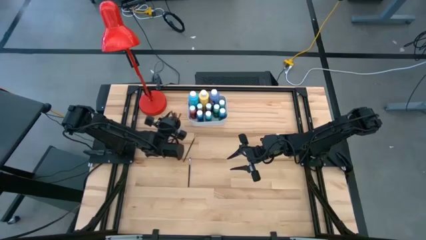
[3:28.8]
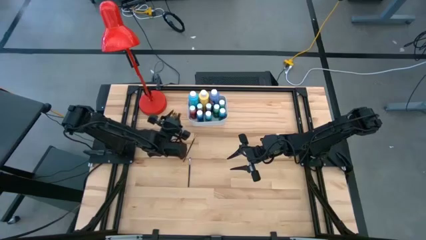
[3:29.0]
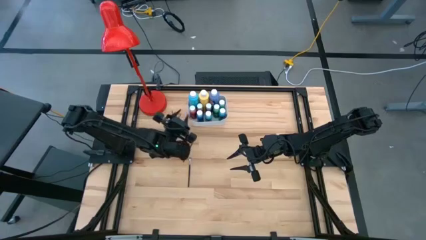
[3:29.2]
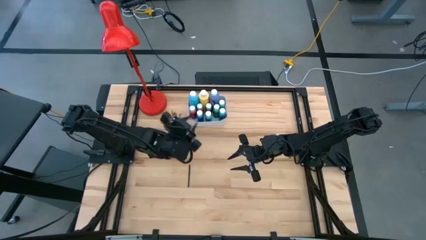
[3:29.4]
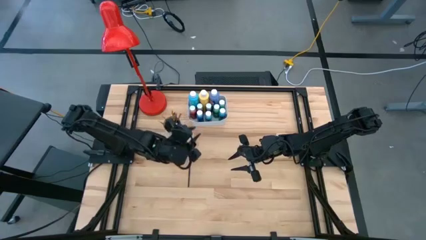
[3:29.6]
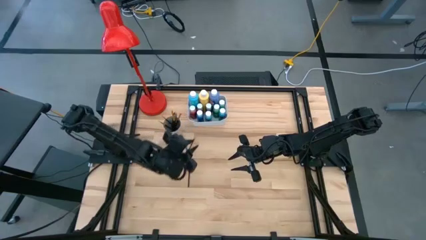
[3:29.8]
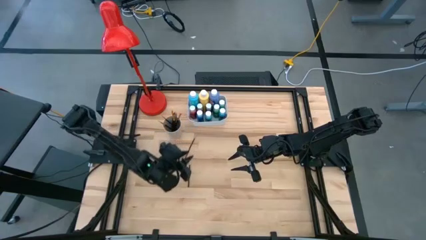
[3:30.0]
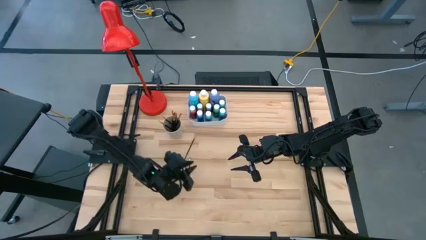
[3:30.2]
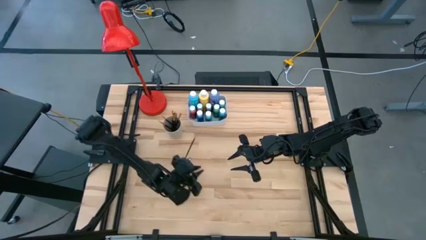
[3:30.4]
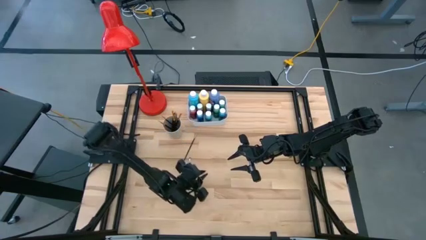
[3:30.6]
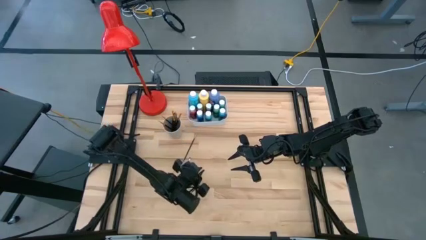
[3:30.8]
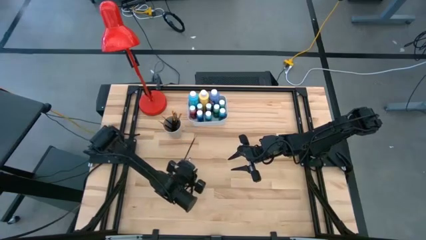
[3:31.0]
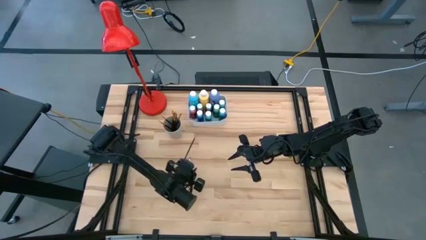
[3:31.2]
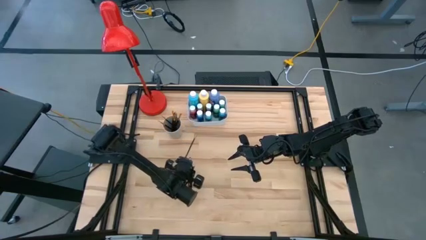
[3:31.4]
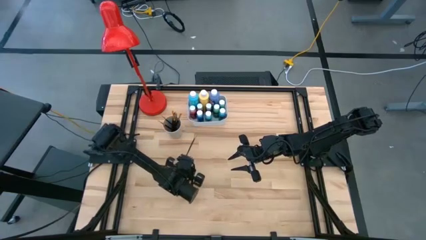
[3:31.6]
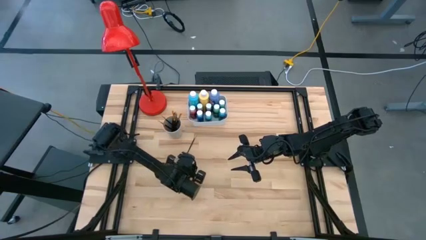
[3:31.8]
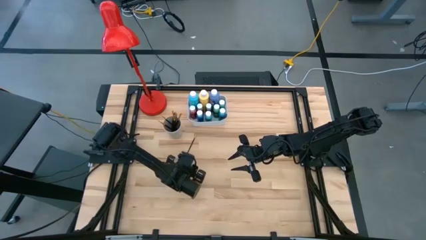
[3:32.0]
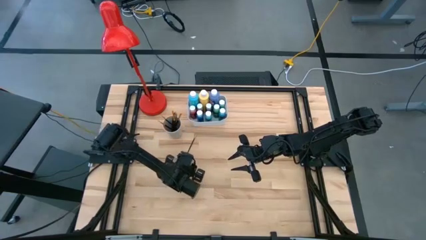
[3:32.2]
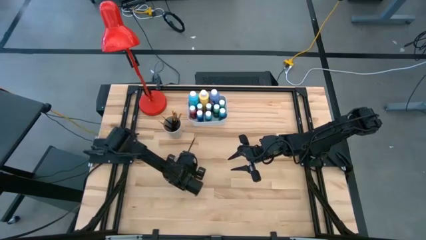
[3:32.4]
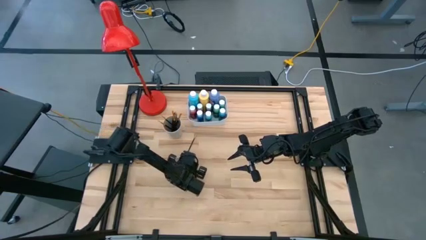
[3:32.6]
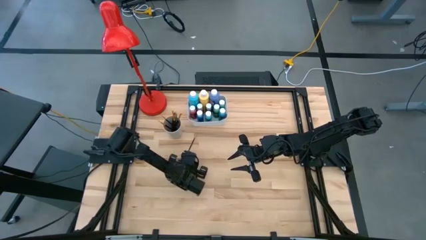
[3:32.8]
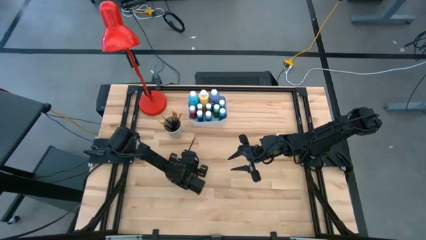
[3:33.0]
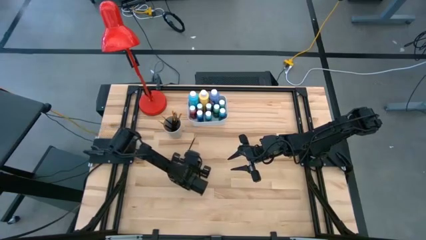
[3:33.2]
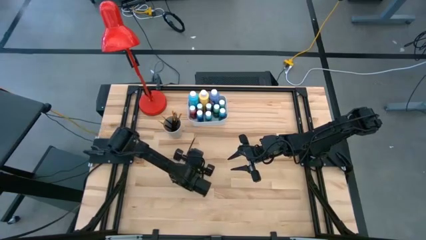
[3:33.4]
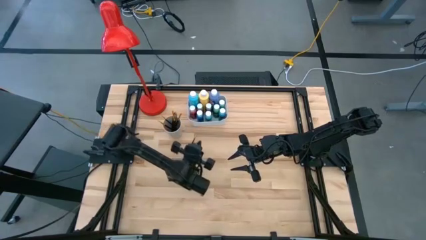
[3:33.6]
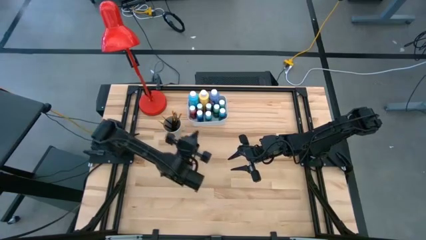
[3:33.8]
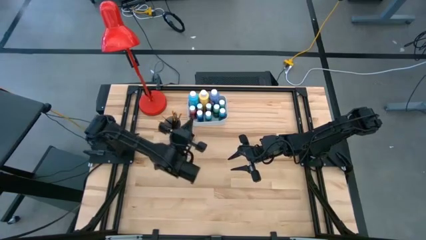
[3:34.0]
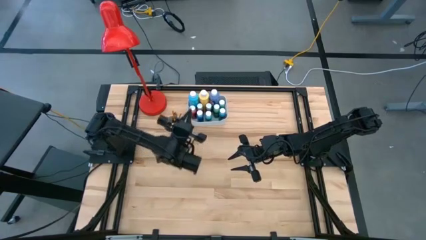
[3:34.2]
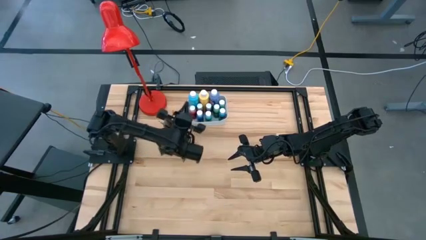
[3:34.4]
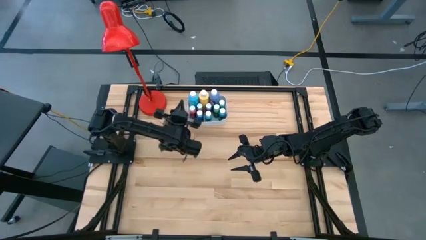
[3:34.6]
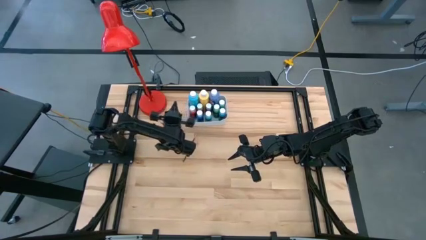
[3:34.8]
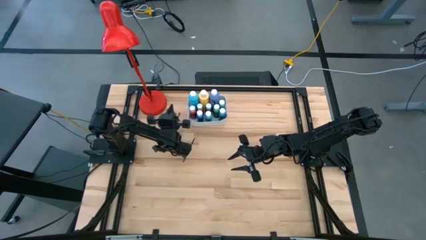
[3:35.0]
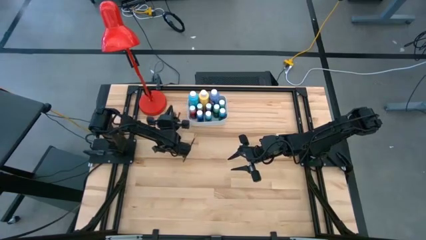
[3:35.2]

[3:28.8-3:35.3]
Task: Pick & Place Paint Supplies
Put the black paint brush into the white cup

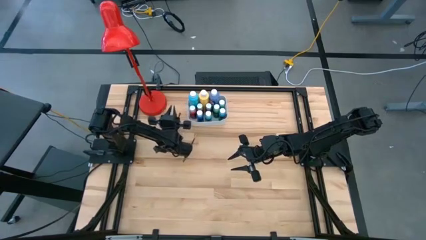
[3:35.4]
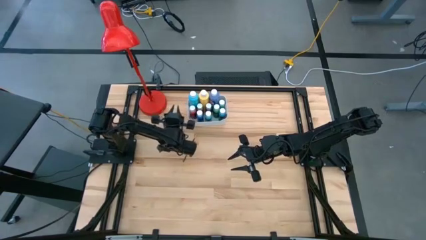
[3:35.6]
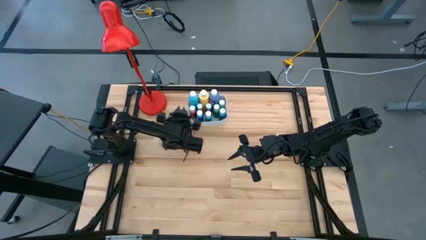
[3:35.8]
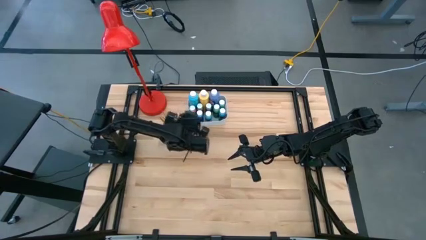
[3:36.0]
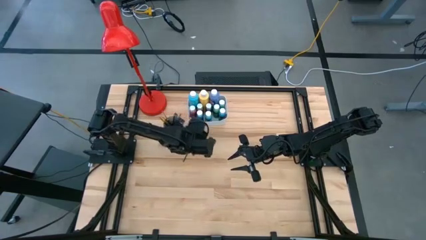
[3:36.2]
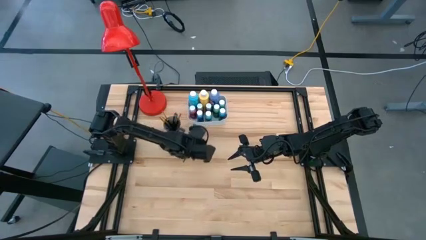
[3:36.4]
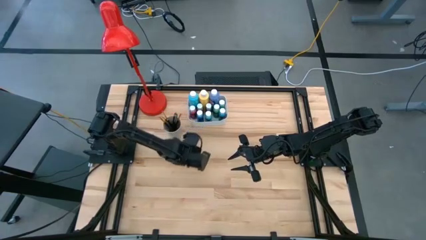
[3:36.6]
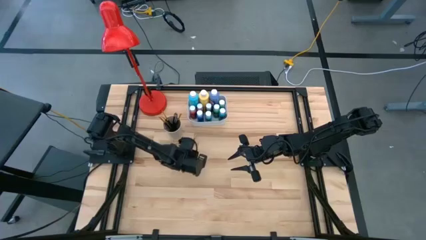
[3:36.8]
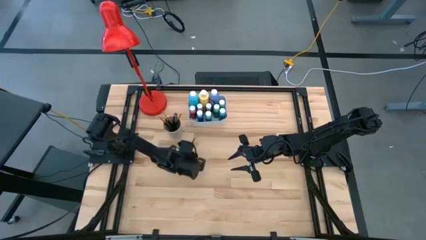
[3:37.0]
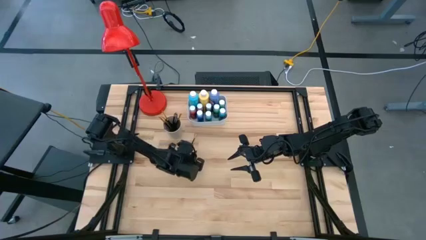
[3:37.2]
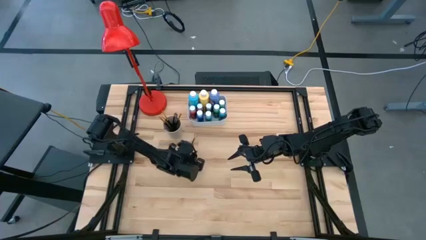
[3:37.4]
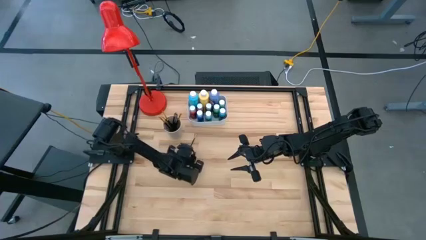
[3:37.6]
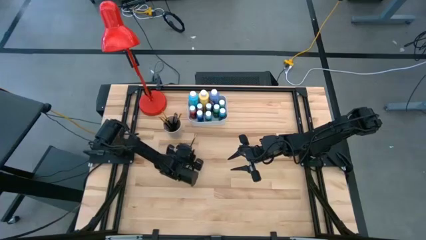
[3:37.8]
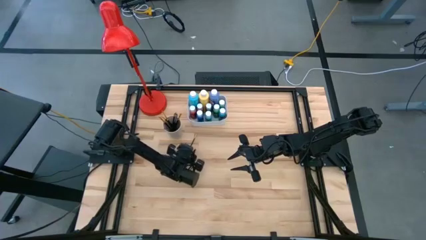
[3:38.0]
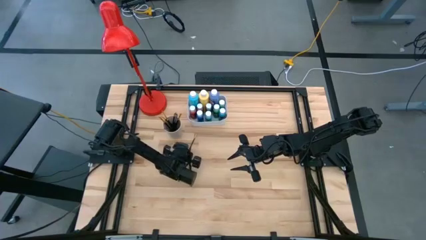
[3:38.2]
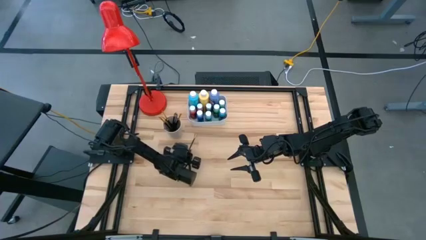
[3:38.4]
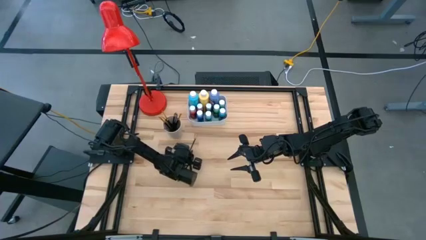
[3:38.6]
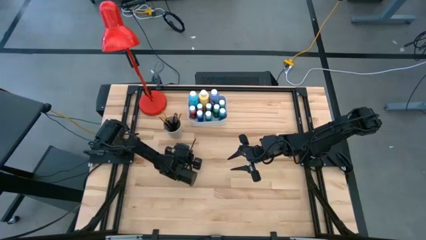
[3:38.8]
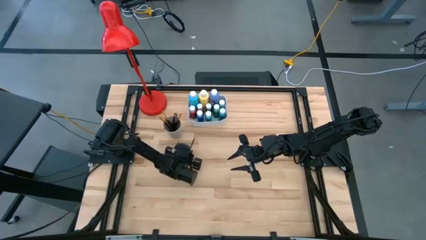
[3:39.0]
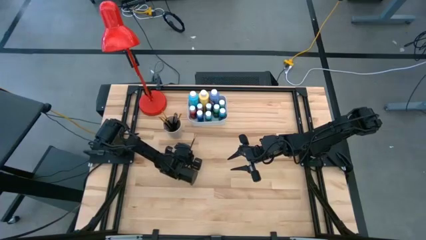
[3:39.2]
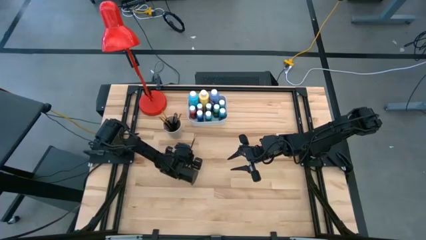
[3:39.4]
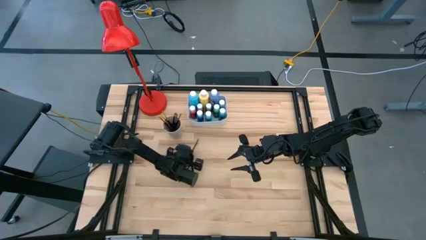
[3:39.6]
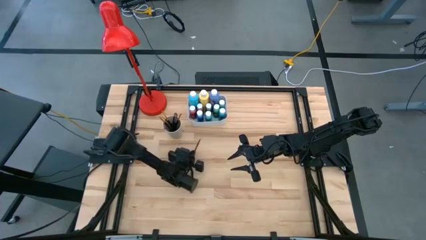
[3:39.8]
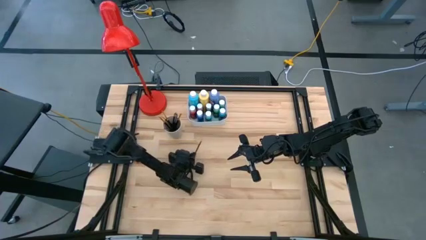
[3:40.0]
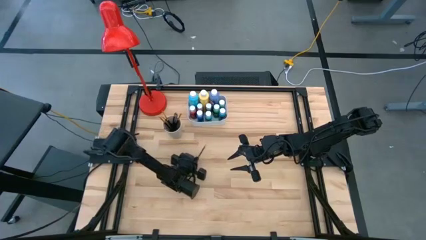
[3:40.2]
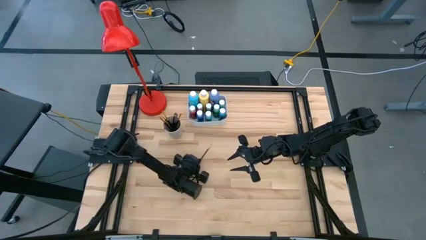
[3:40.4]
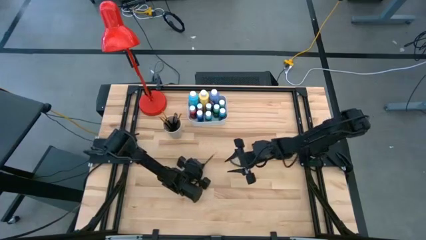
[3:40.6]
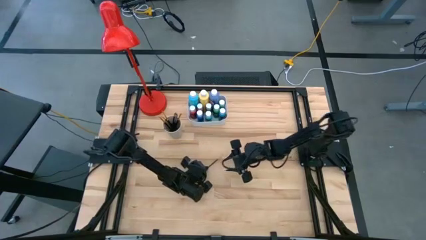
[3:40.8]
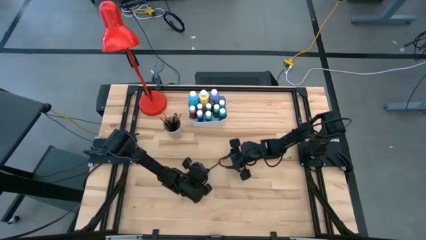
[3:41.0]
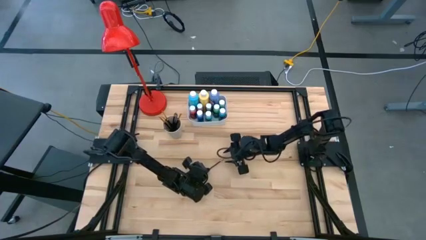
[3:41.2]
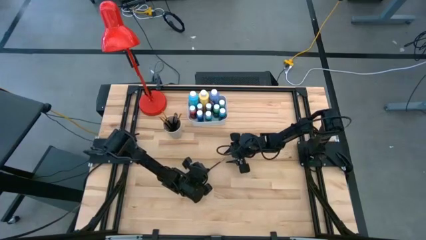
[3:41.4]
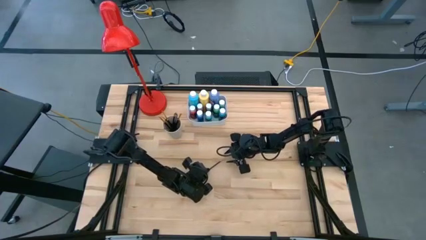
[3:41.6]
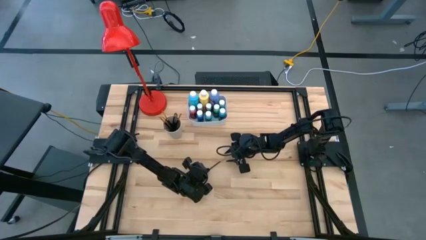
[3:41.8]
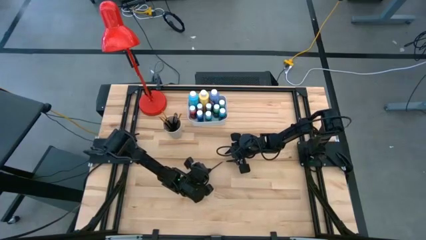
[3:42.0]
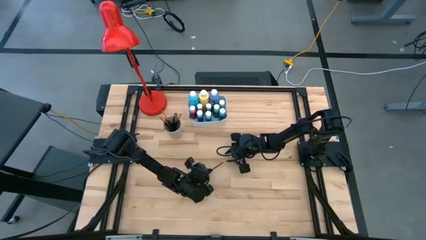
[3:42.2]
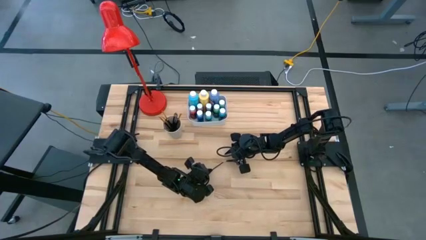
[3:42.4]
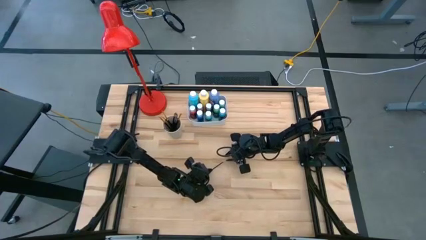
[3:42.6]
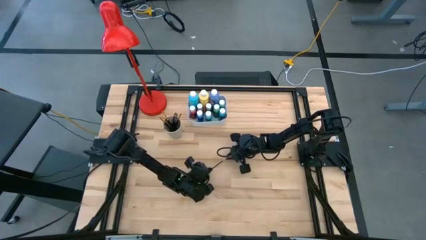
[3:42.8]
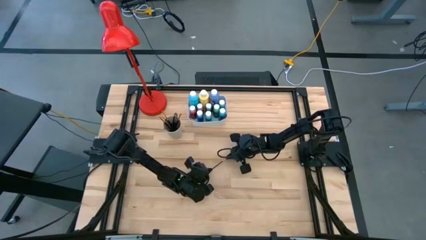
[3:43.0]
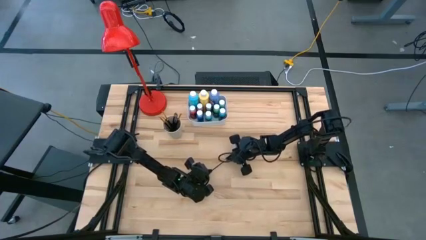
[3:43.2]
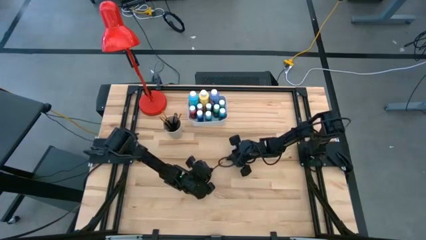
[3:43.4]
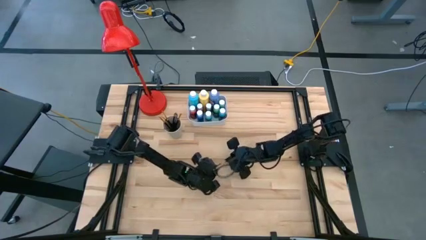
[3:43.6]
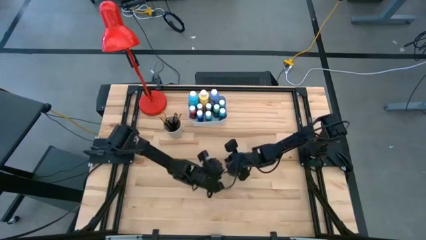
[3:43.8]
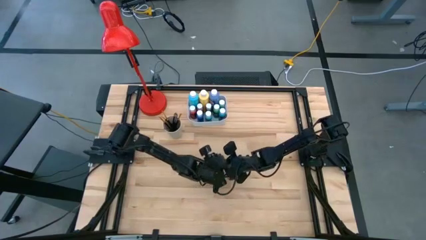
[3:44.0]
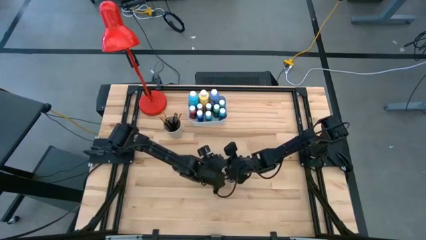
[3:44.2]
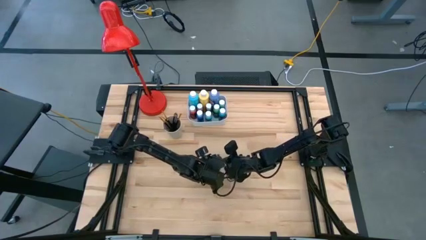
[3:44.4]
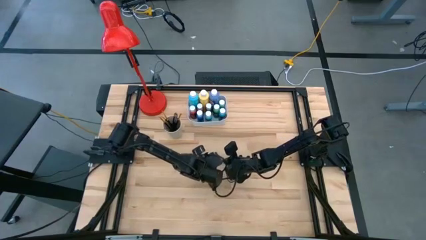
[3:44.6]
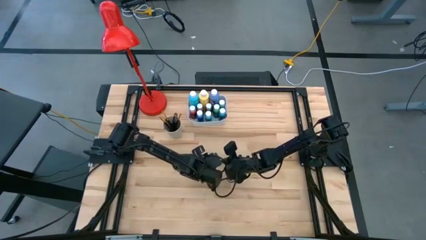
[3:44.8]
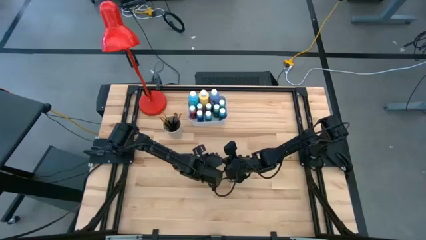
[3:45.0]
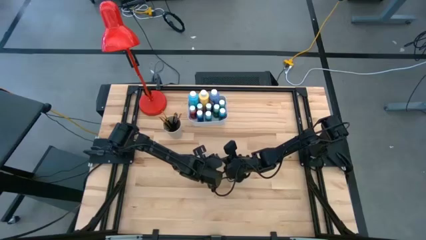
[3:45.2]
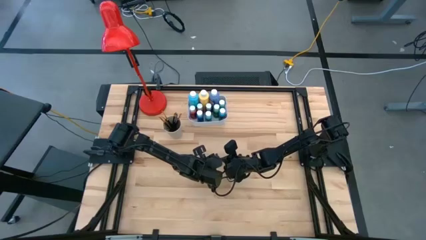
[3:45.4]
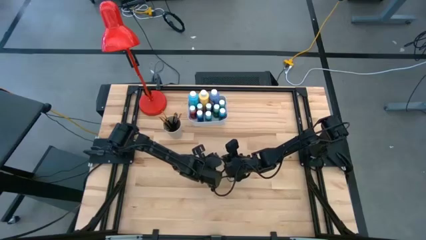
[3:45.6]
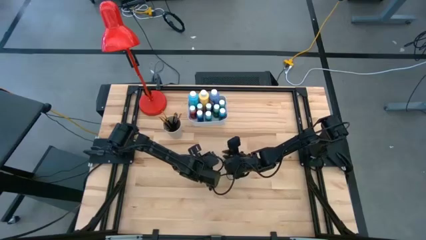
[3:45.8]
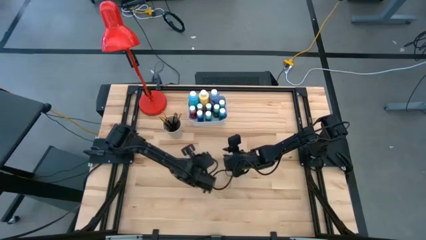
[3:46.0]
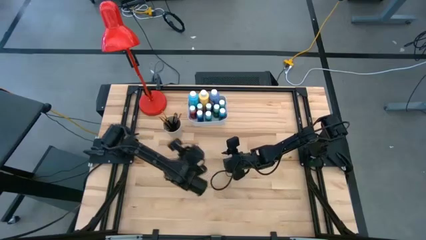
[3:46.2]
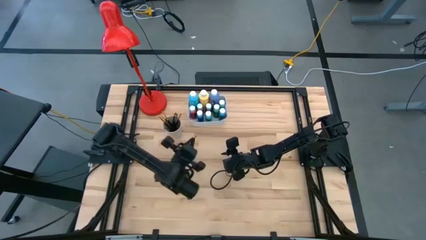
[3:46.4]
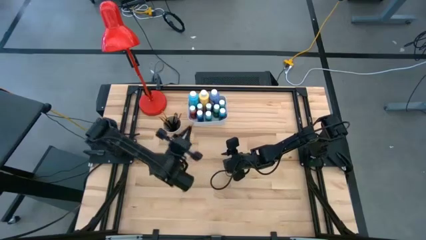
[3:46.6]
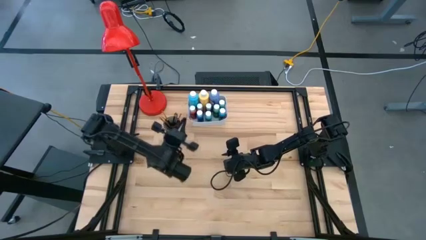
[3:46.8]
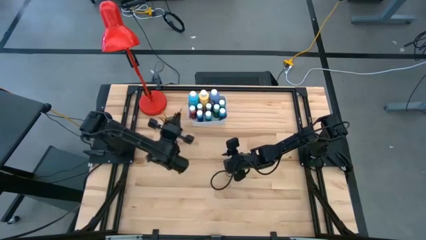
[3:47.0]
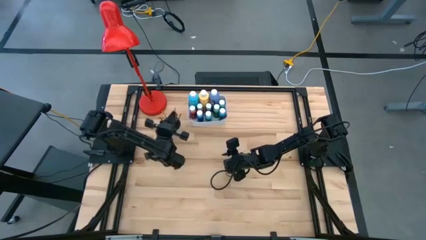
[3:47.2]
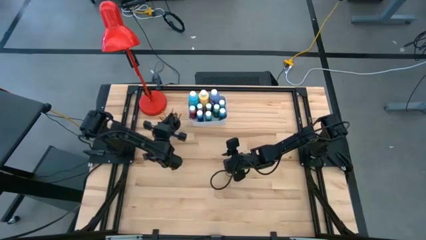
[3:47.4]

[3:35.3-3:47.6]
Put the black paint brush into the white cup
